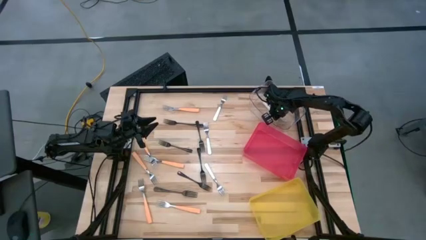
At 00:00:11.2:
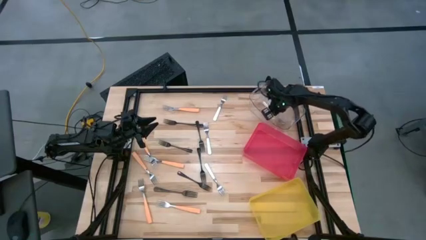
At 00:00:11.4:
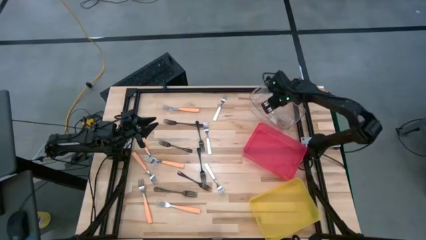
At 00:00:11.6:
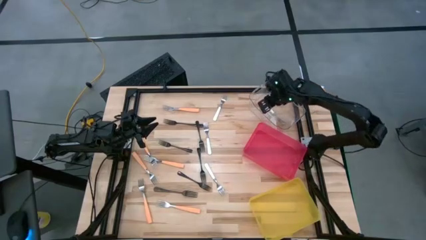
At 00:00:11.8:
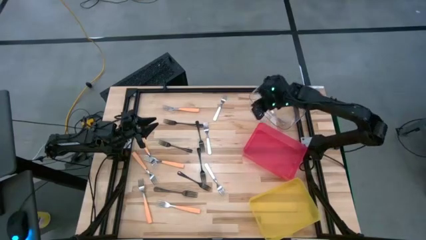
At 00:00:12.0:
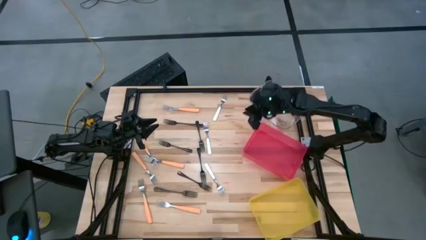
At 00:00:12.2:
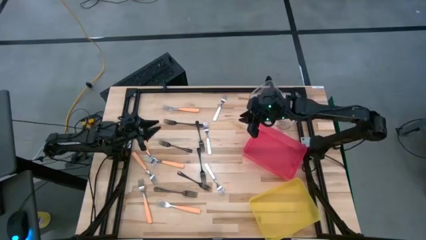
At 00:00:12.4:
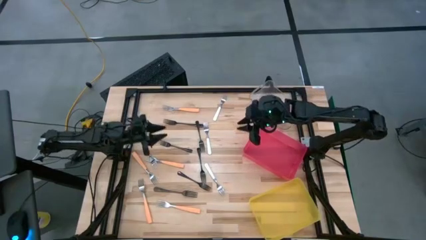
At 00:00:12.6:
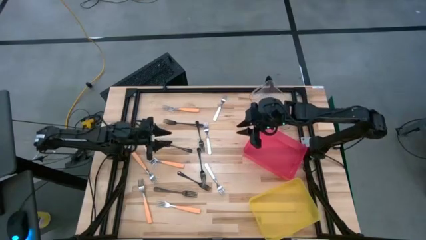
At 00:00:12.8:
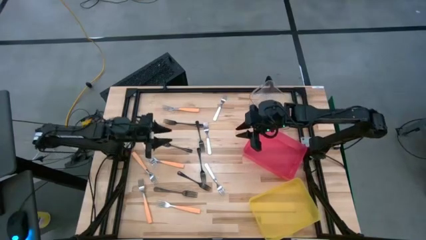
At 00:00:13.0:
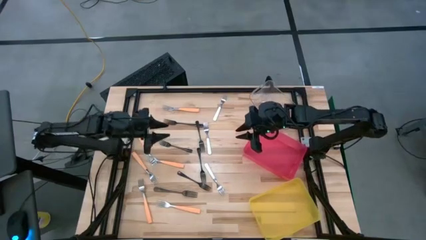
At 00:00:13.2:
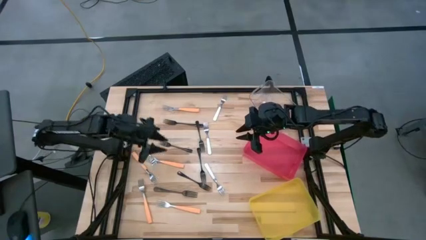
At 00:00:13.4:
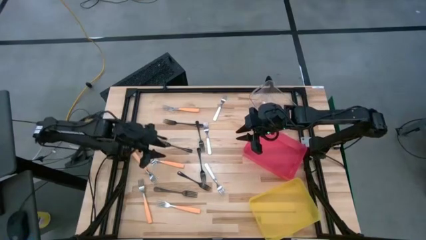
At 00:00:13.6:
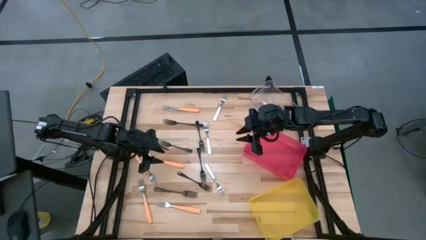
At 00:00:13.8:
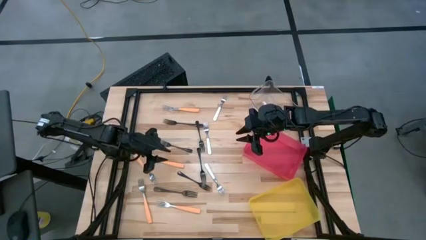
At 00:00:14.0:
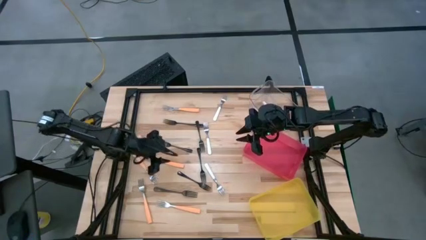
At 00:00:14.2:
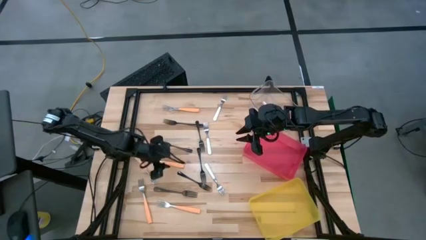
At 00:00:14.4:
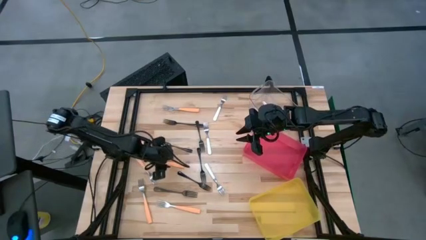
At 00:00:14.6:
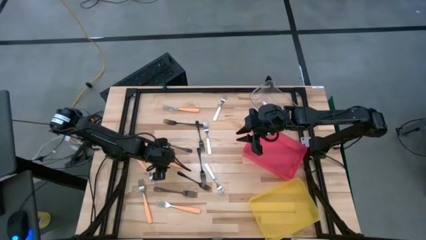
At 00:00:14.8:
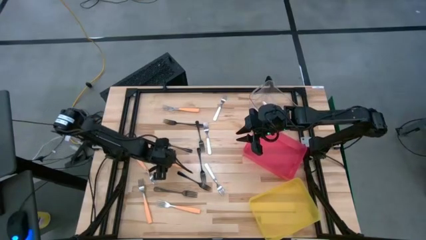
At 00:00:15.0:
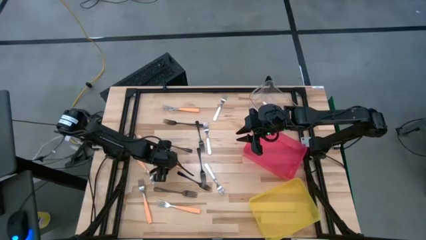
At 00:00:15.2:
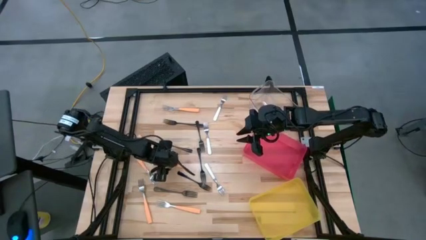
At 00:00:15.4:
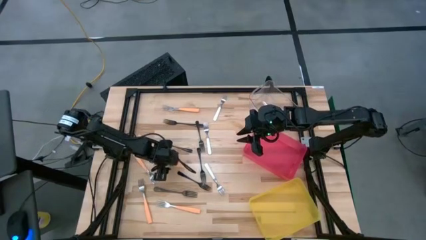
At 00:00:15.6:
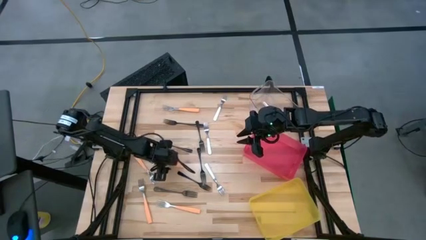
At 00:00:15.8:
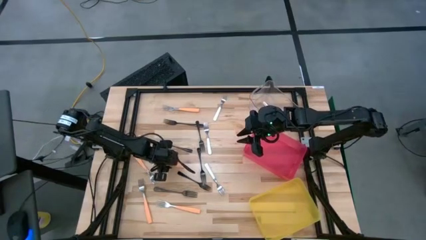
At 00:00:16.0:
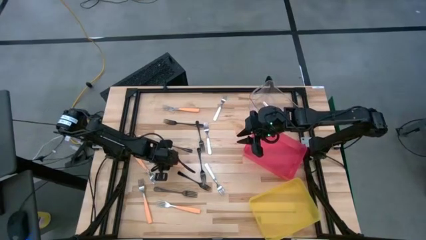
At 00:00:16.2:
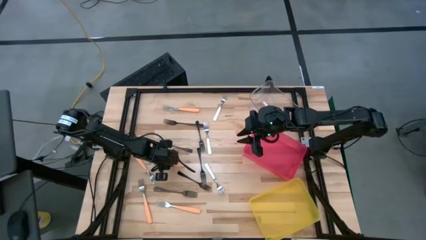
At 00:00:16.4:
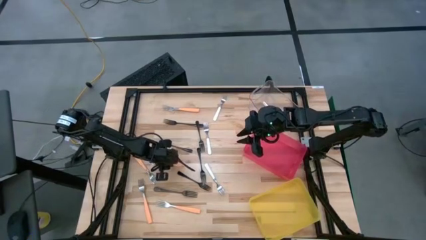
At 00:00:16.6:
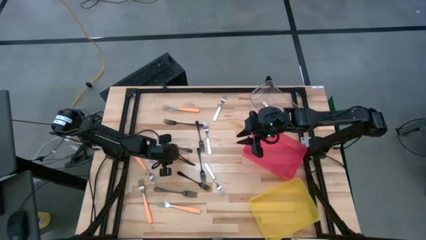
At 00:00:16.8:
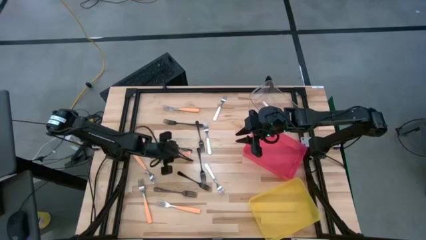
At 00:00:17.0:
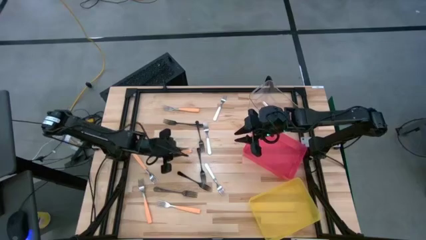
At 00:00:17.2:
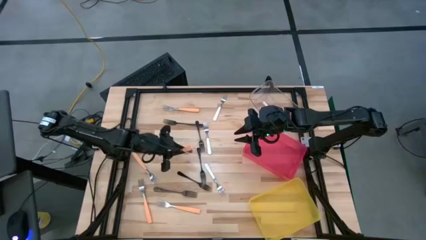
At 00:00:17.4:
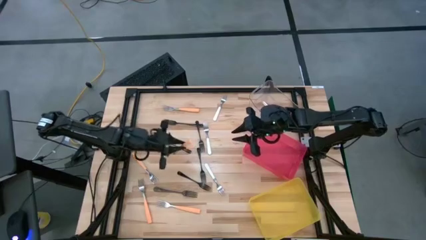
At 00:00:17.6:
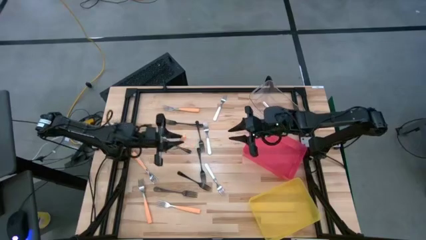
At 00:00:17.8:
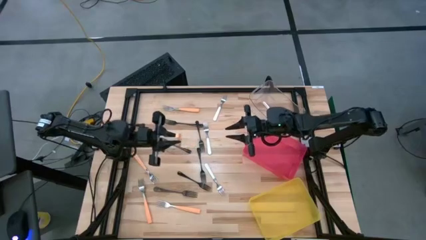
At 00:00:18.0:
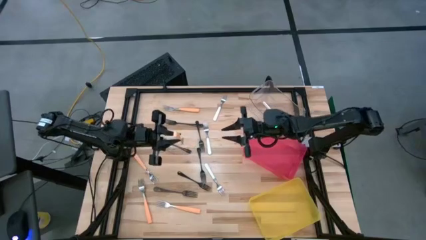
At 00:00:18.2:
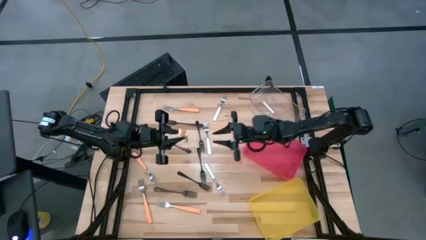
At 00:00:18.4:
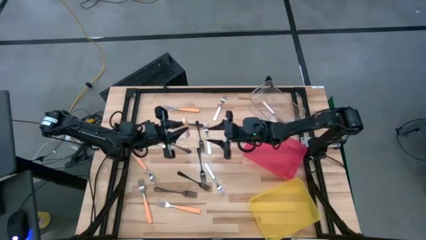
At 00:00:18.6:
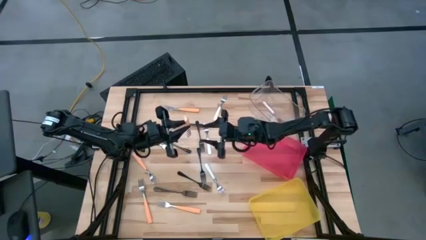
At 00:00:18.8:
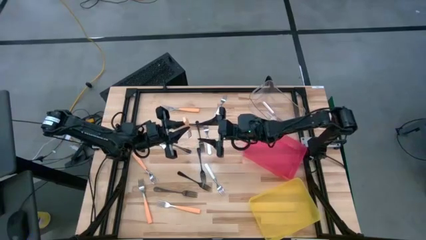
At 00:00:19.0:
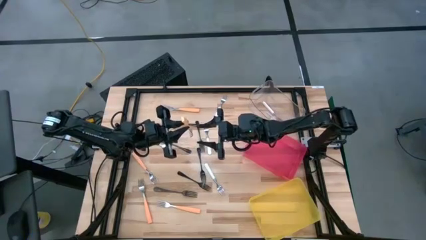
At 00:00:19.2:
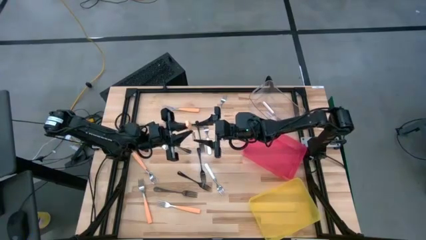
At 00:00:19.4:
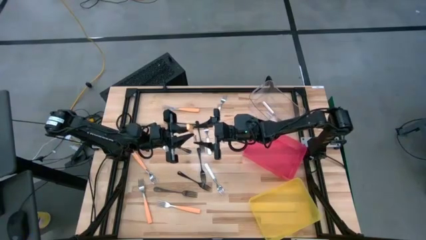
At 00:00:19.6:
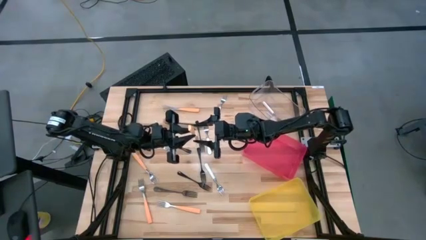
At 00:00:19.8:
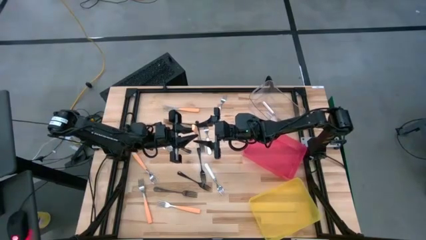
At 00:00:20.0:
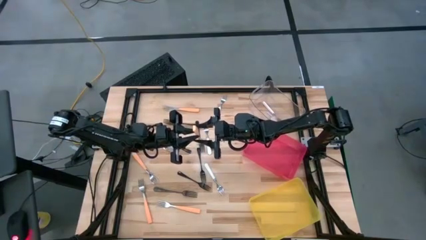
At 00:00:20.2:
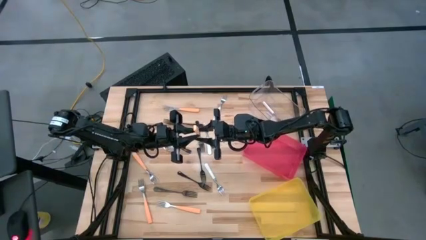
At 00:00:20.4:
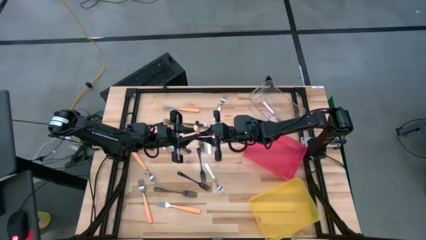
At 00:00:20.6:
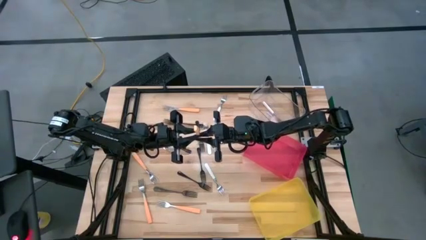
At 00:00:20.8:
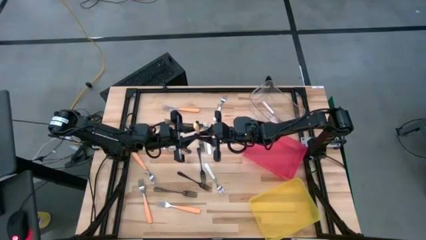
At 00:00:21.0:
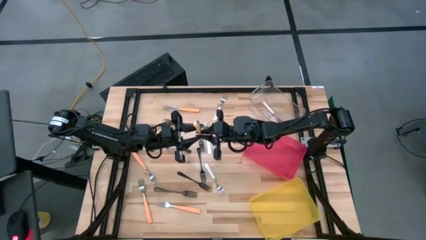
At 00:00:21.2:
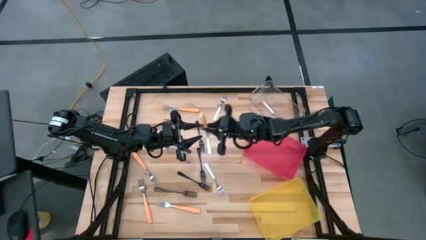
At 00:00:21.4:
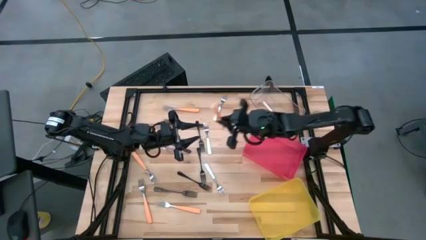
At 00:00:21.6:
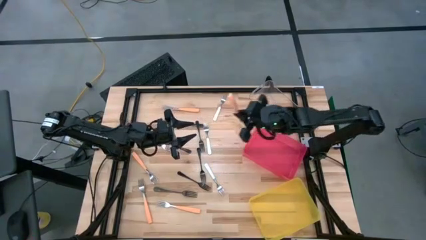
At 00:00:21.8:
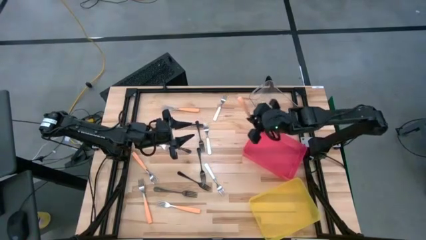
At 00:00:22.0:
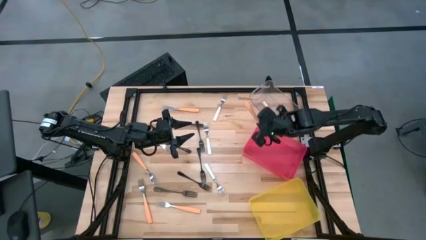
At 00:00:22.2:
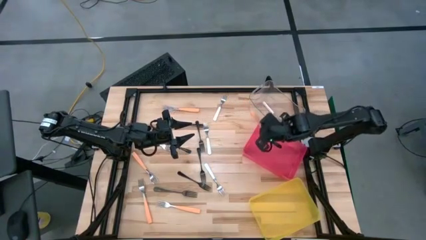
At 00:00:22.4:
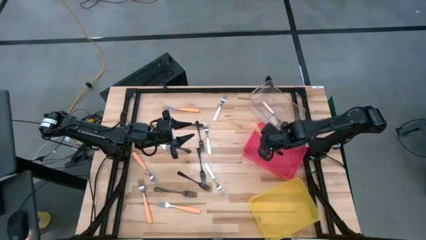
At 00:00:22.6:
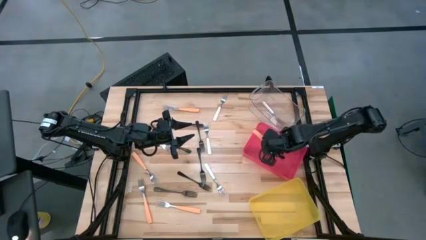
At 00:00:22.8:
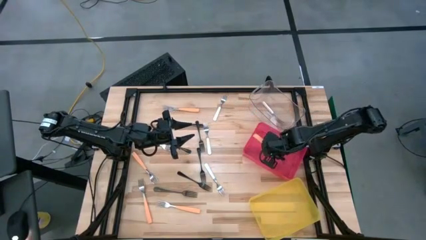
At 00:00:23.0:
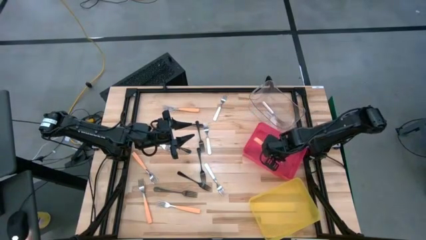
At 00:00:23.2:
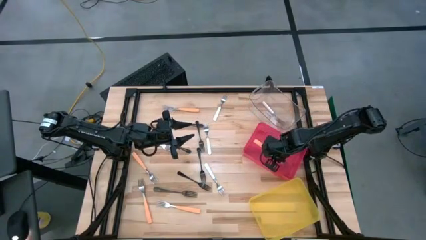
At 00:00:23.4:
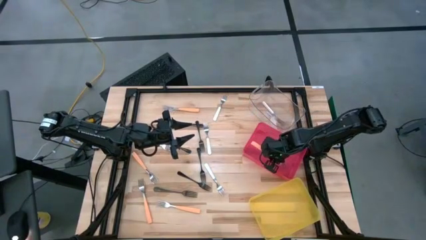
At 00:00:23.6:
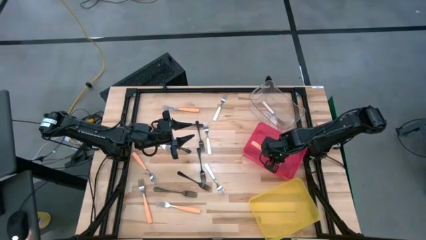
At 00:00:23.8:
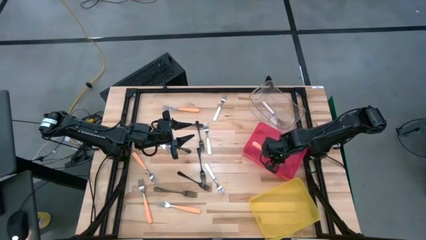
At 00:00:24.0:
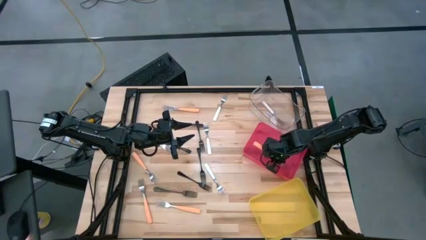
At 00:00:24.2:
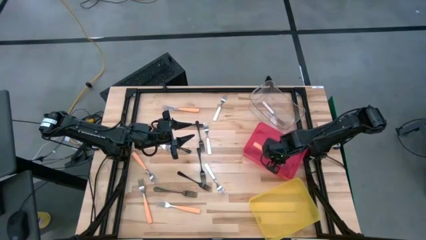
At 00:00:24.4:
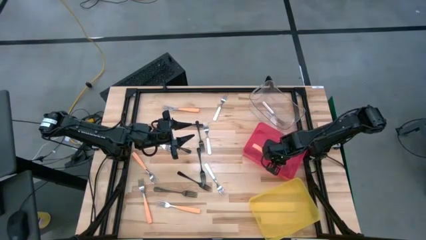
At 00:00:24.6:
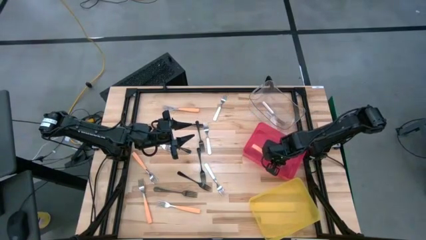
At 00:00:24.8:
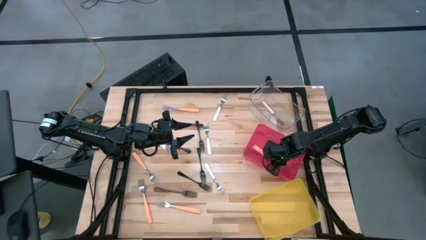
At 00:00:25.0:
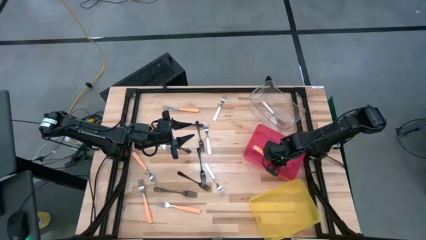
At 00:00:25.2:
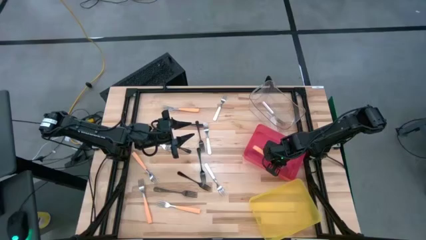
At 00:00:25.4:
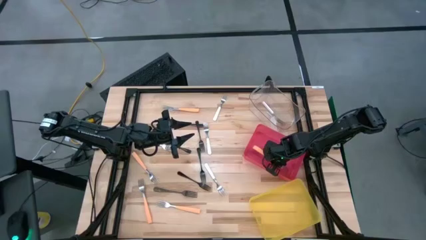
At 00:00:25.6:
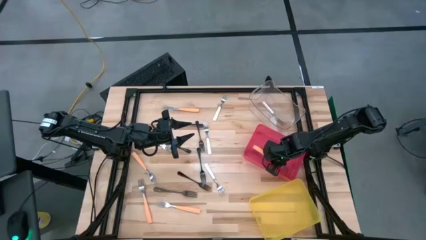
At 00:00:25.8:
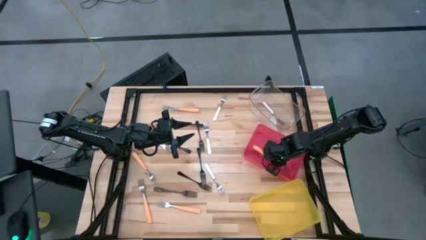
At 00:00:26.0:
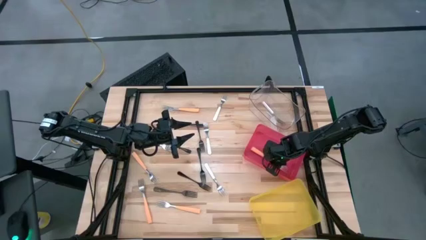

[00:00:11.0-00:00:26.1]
Task: Sort silverware by color (type)
Put the orange fork into the red bin
